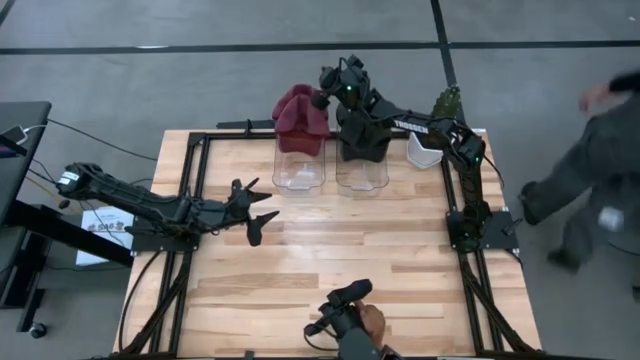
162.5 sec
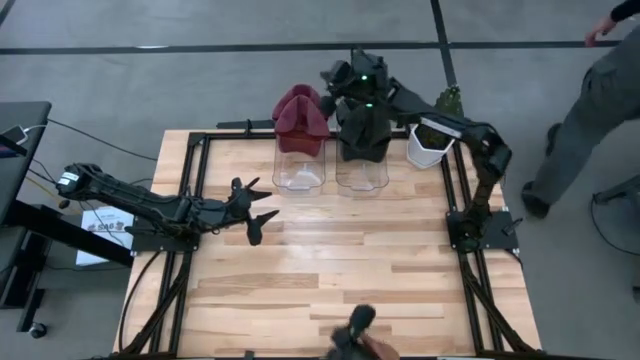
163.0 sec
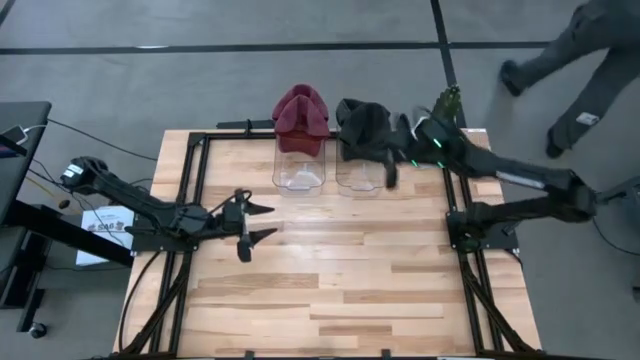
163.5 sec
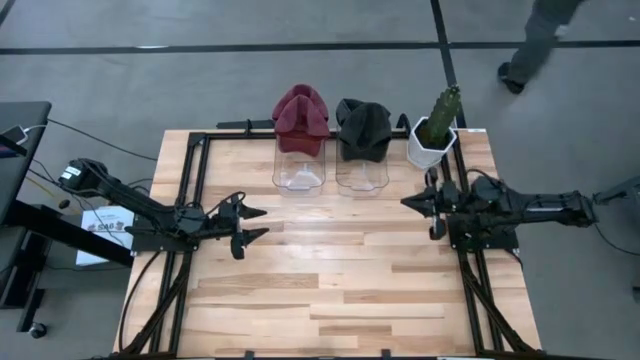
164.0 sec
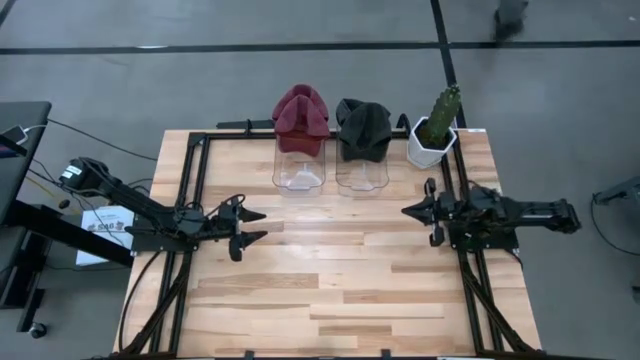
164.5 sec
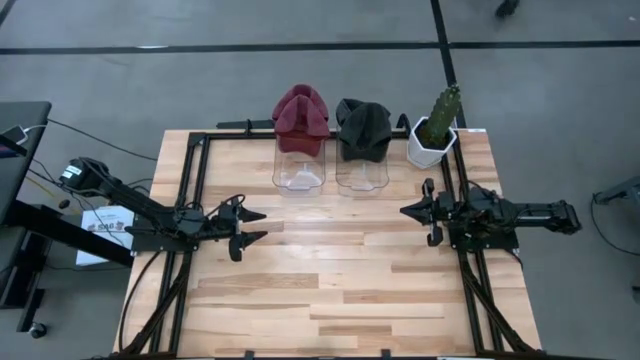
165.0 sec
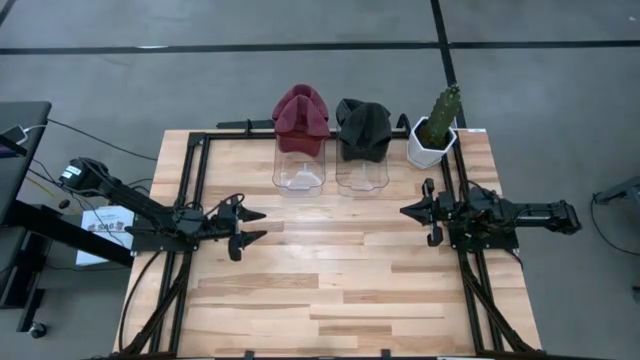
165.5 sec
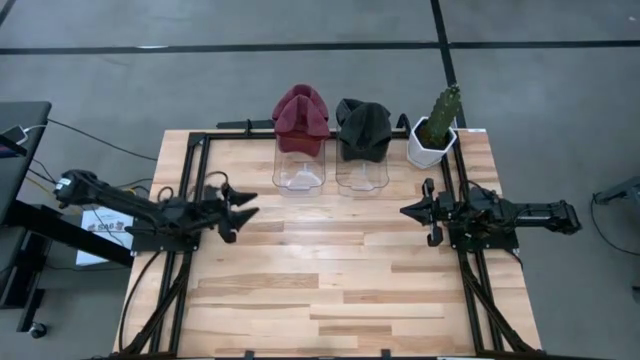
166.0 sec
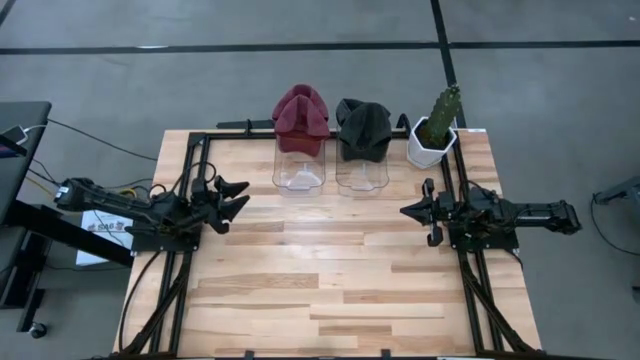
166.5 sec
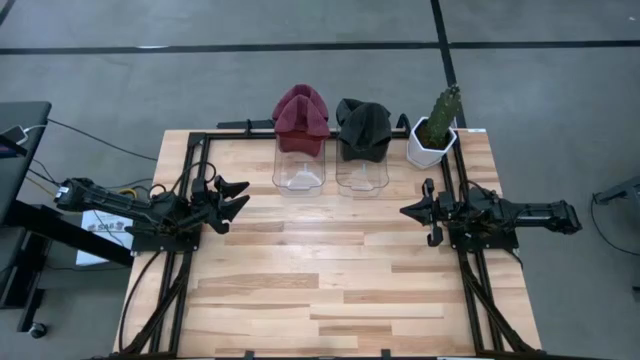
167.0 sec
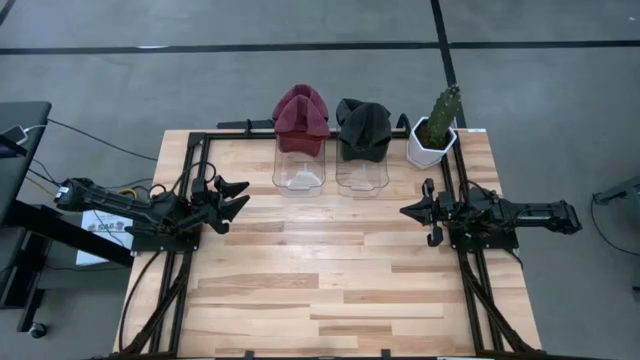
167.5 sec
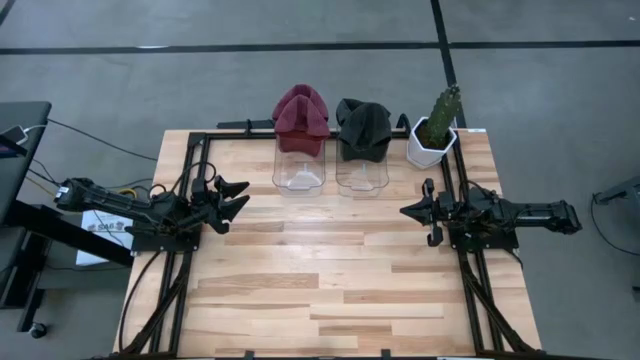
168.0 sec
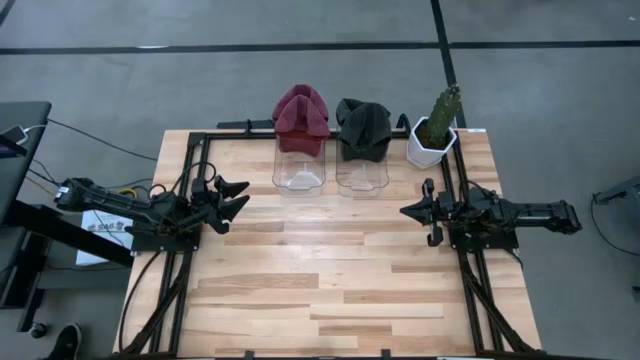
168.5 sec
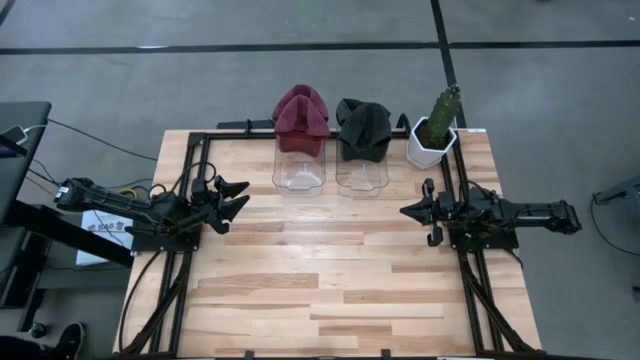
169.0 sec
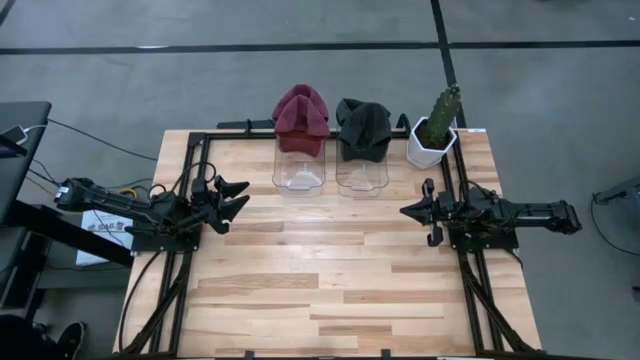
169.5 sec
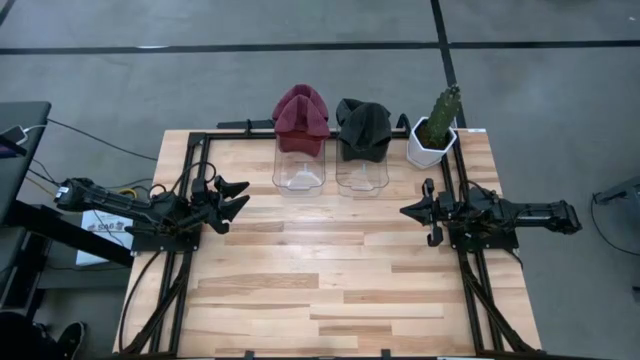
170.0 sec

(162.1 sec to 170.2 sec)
Task: Pick & Place hat
Return to Home Position

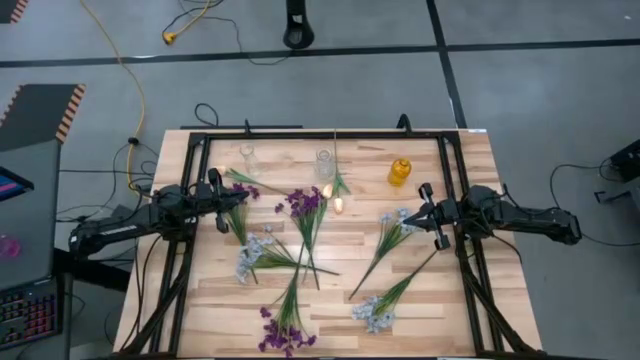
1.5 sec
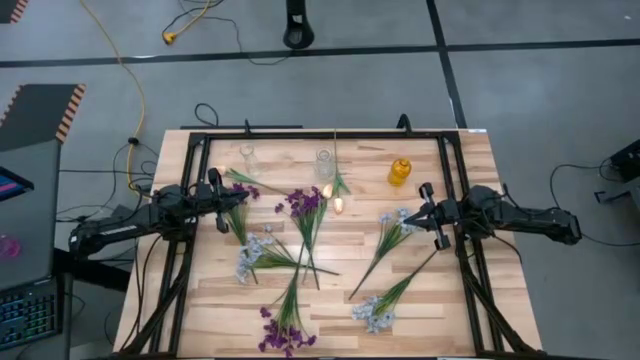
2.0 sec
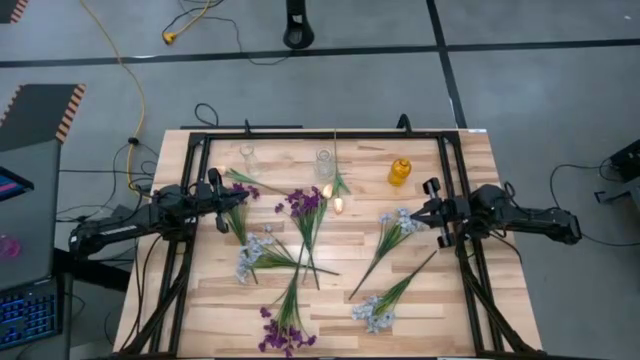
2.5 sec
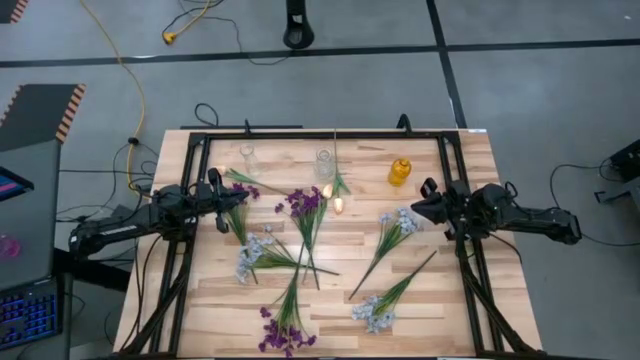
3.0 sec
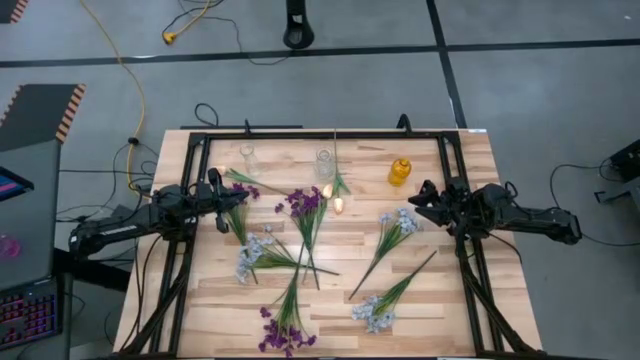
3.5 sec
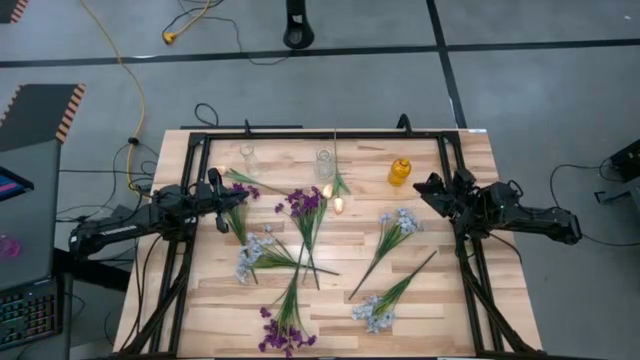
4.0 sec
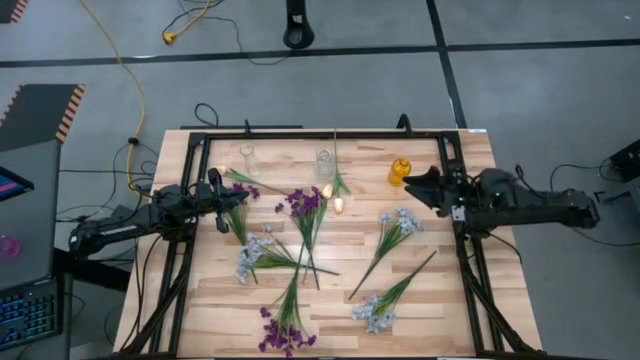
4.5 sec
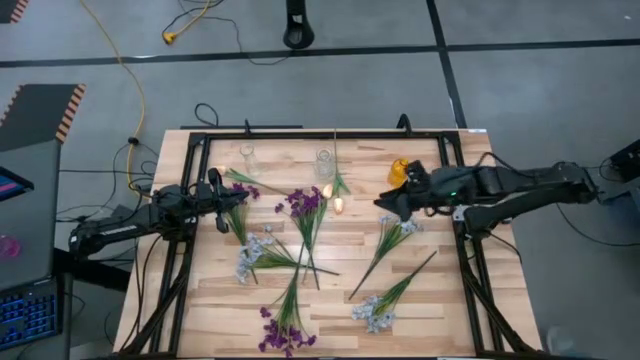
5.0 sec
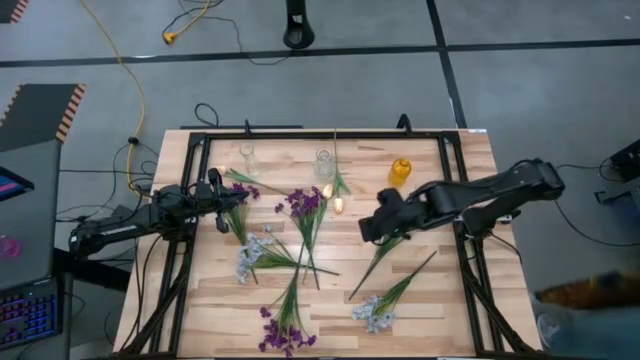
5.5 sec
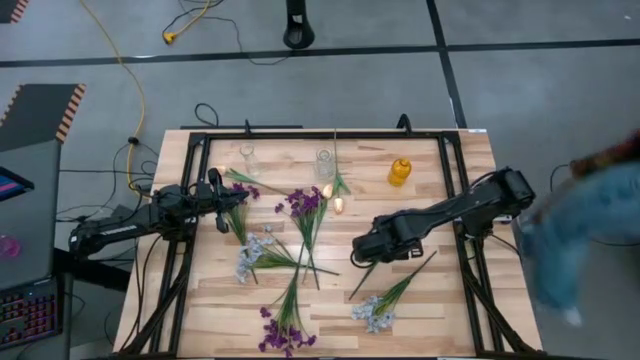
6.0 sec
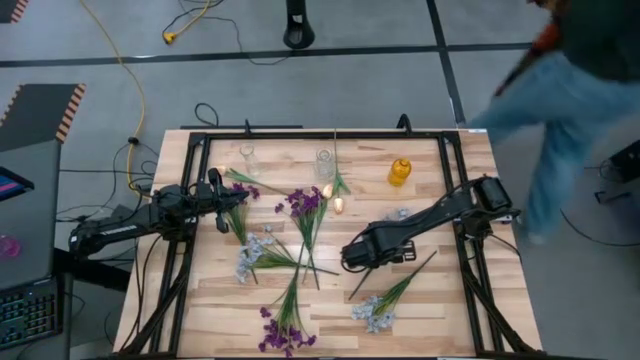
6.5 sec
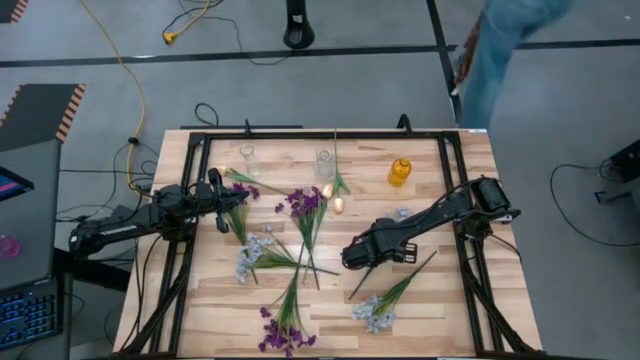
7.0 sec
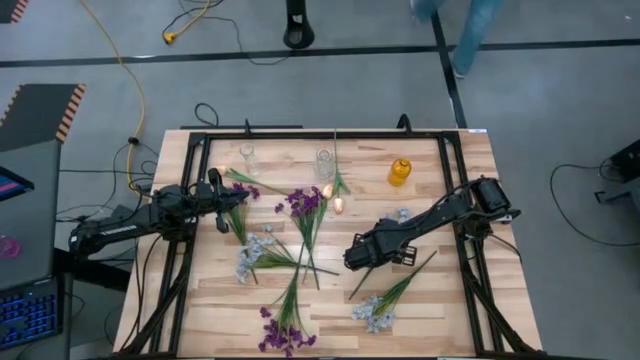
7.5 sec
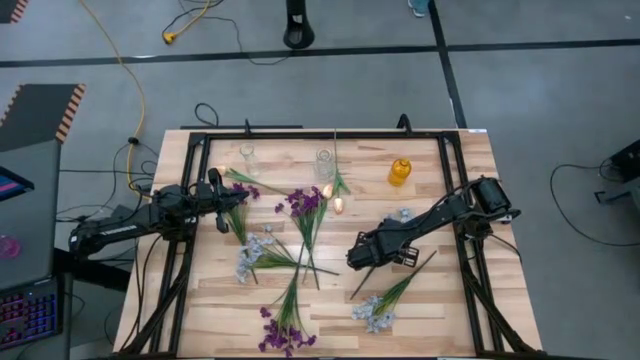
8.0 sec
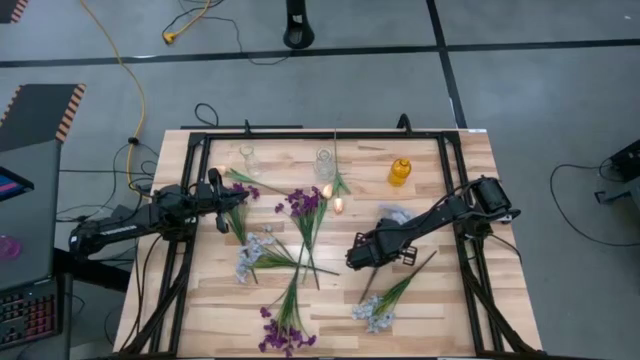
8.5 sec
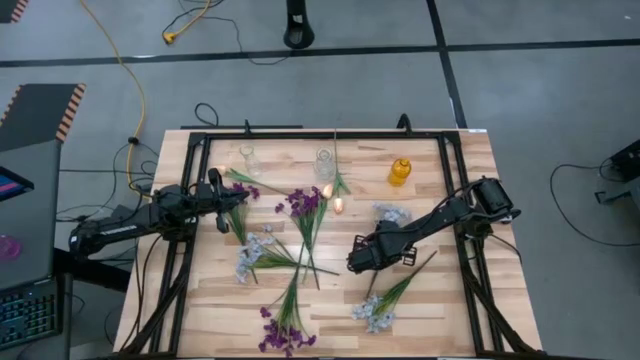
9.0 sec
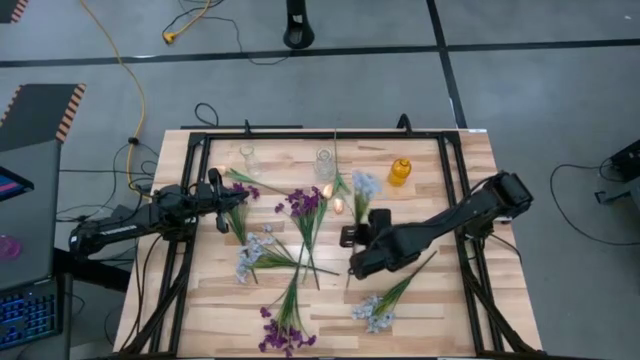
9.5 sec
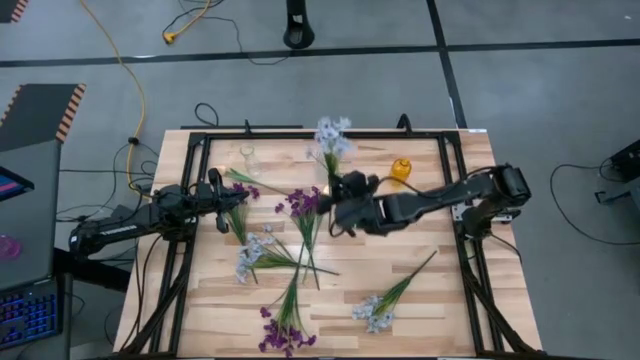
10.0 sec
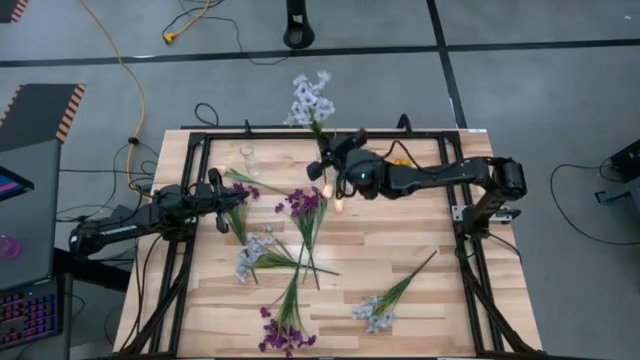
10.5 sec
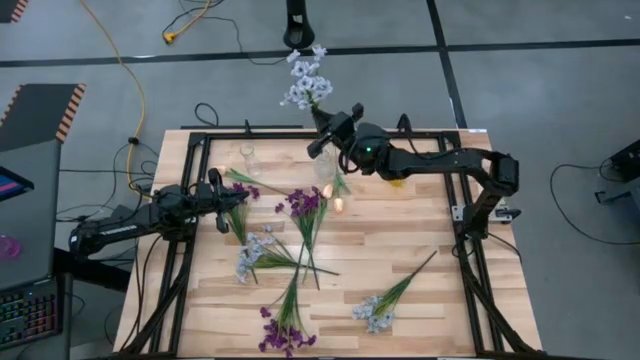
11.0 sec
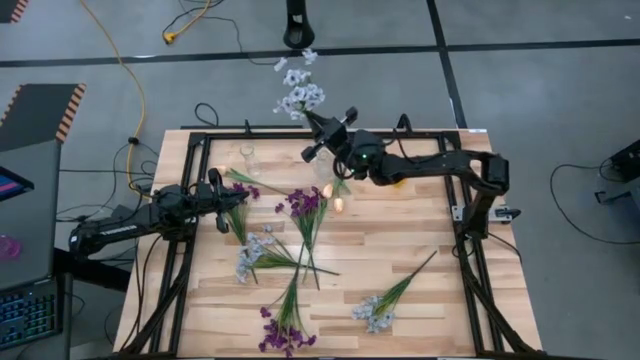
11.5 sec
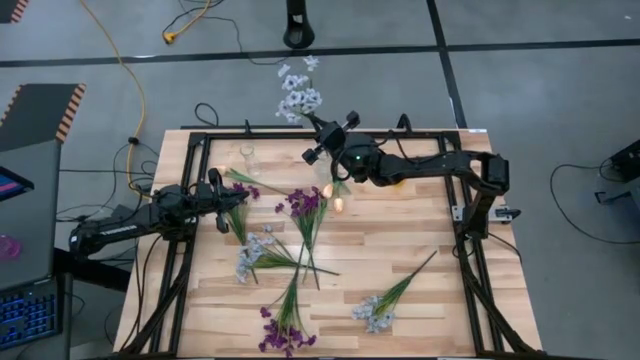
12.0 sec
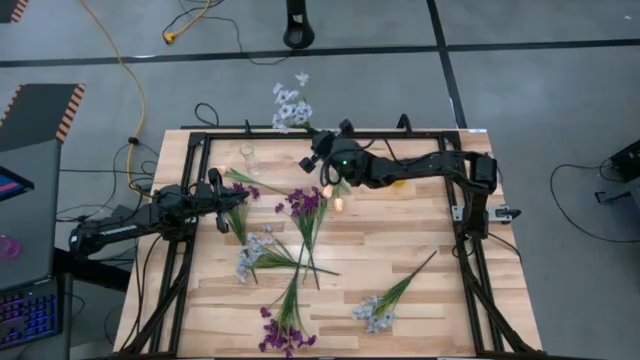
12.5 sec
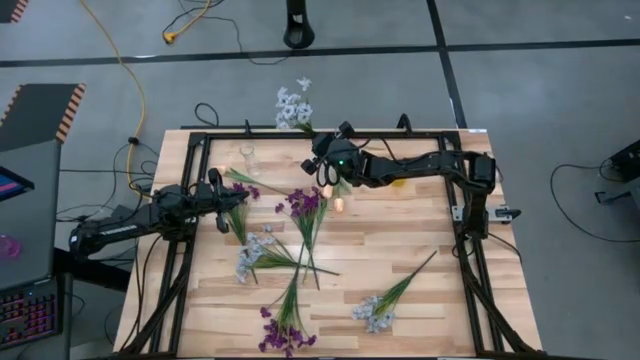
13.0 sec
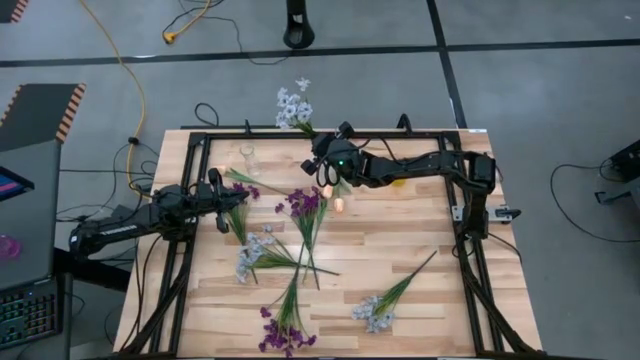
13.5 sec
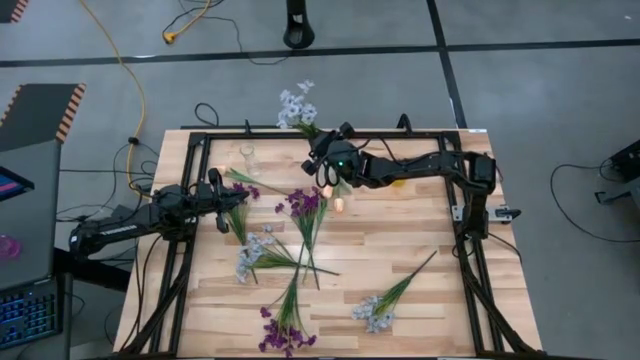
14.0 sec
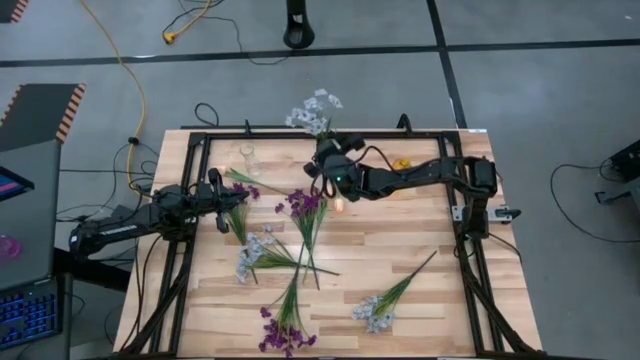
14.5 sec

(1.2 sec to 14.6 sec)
Task: Sort flowers into vase by color
Put the top right white flowers into the right transparent vase
